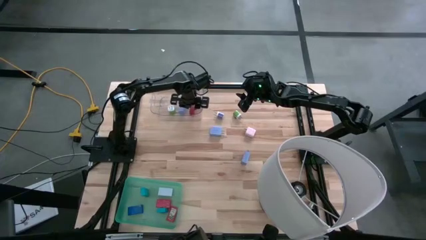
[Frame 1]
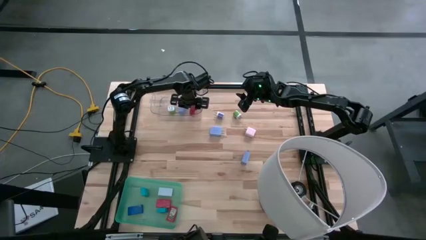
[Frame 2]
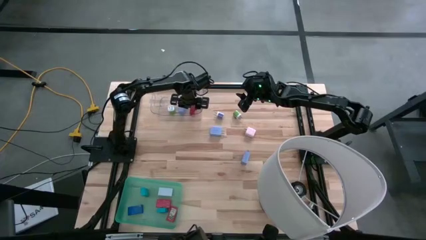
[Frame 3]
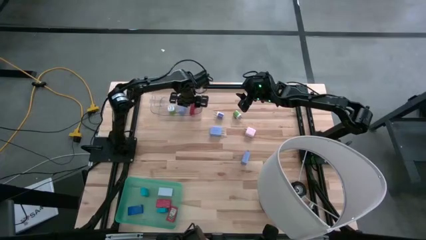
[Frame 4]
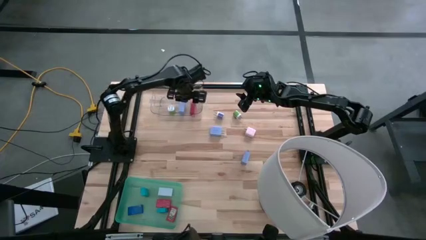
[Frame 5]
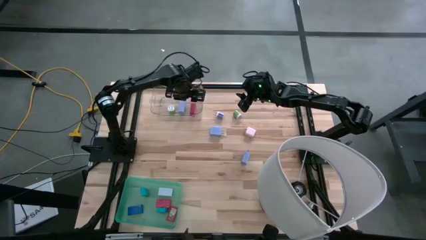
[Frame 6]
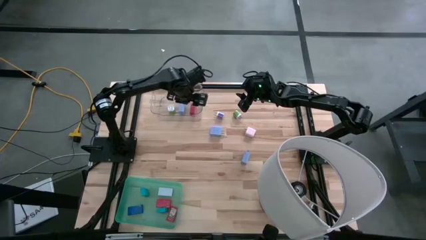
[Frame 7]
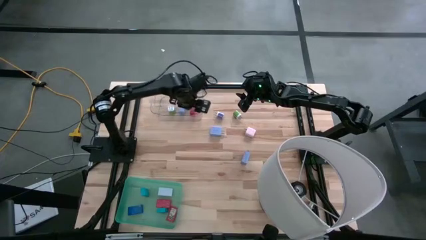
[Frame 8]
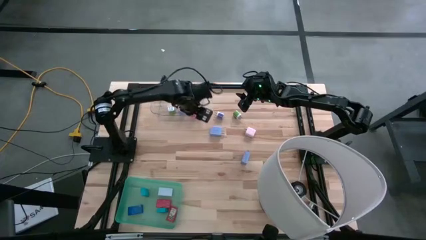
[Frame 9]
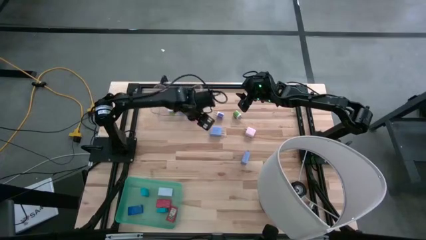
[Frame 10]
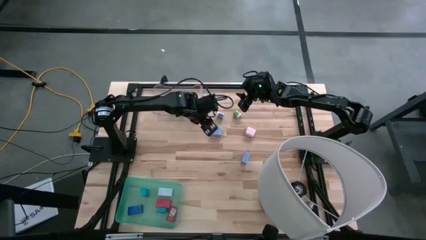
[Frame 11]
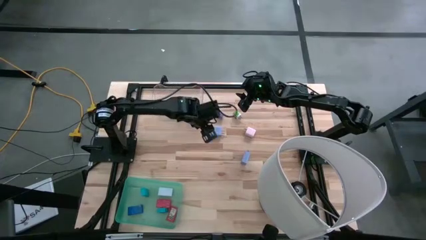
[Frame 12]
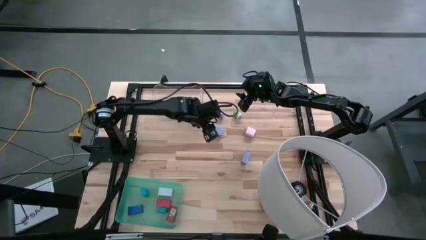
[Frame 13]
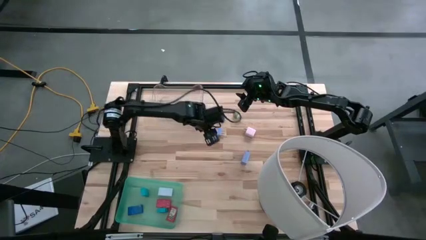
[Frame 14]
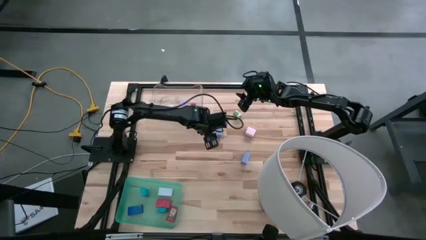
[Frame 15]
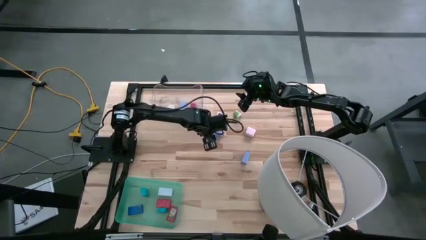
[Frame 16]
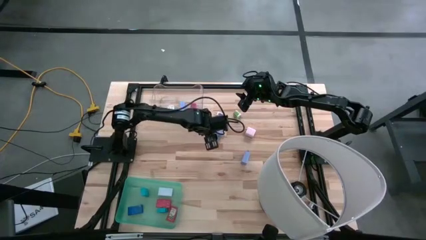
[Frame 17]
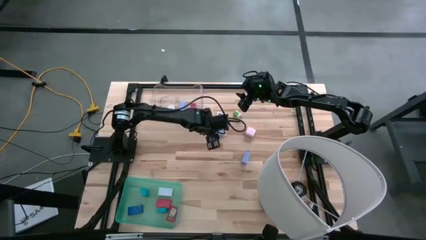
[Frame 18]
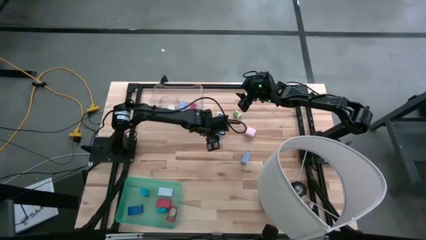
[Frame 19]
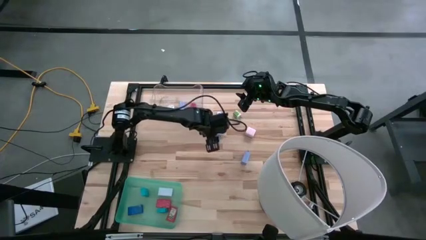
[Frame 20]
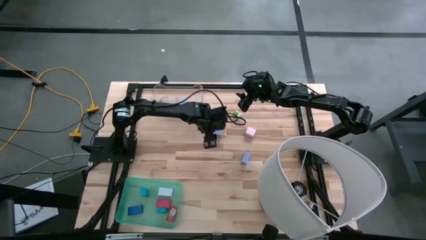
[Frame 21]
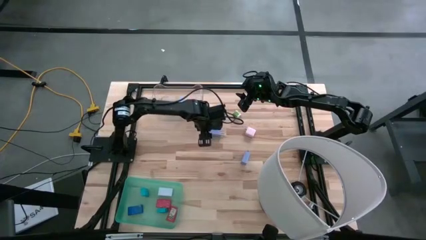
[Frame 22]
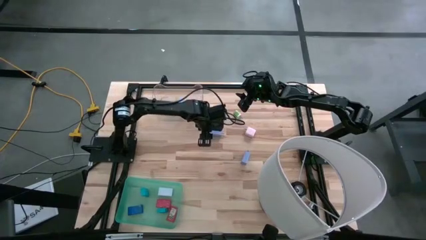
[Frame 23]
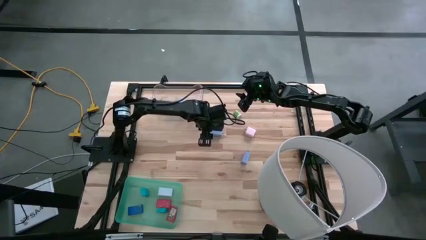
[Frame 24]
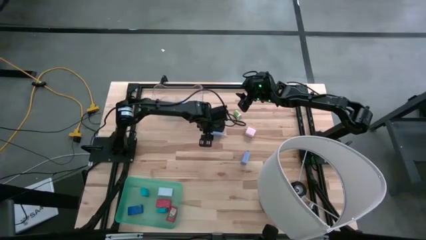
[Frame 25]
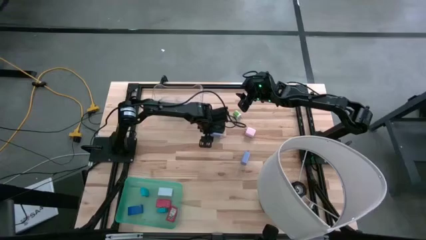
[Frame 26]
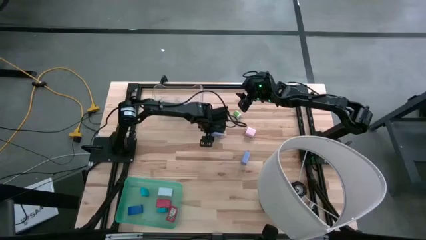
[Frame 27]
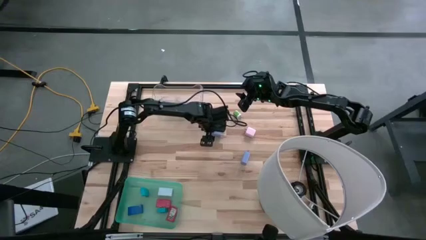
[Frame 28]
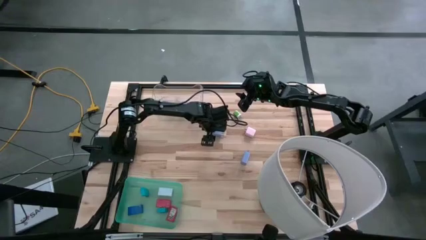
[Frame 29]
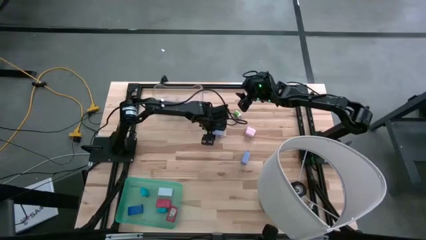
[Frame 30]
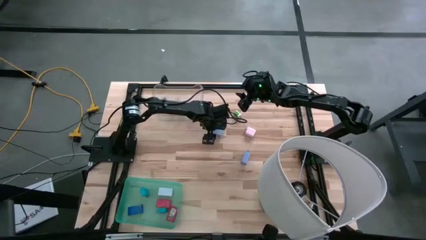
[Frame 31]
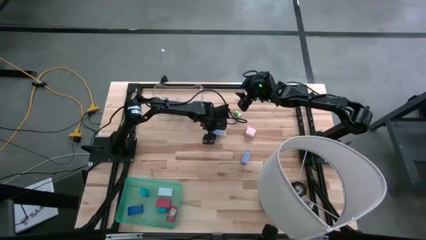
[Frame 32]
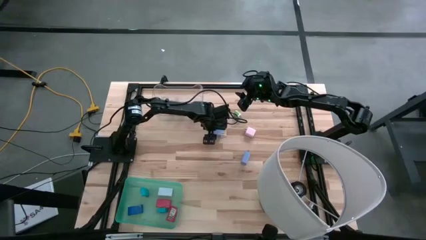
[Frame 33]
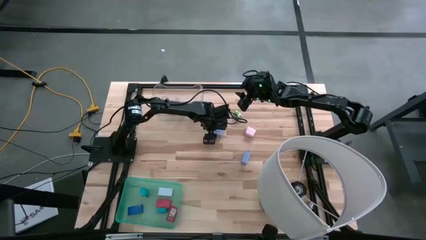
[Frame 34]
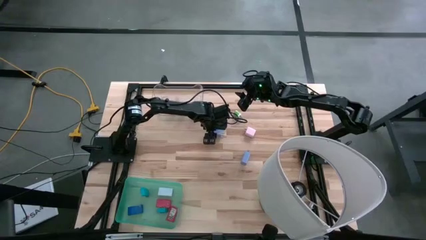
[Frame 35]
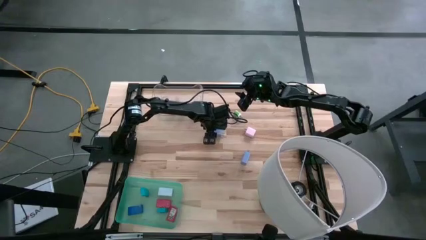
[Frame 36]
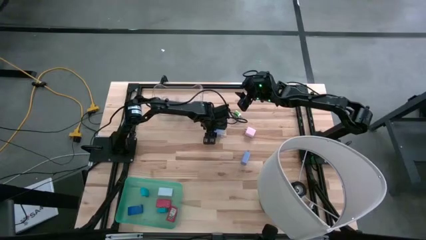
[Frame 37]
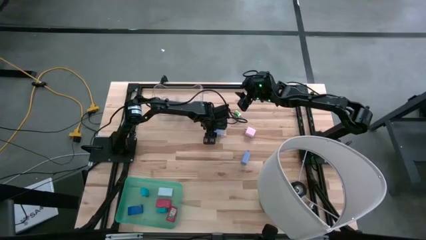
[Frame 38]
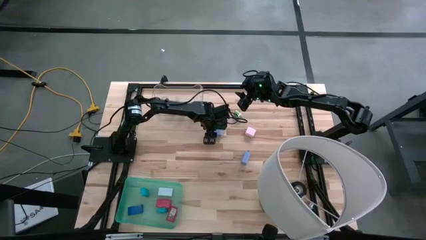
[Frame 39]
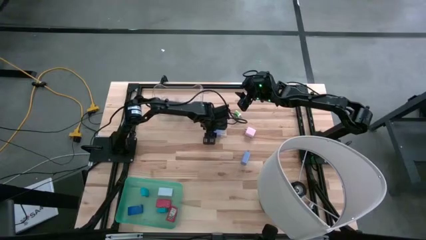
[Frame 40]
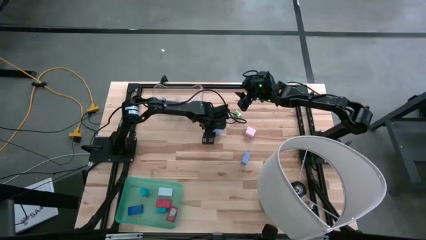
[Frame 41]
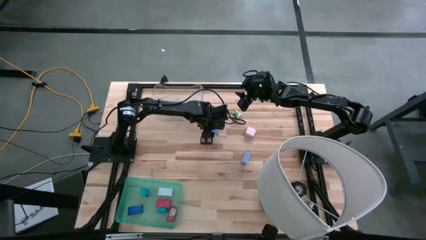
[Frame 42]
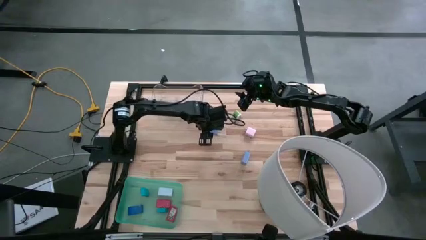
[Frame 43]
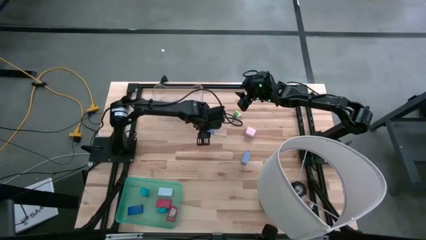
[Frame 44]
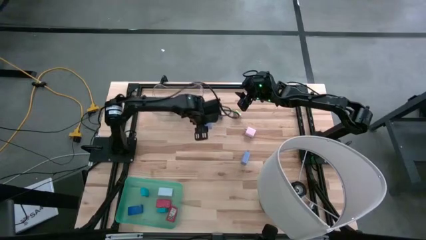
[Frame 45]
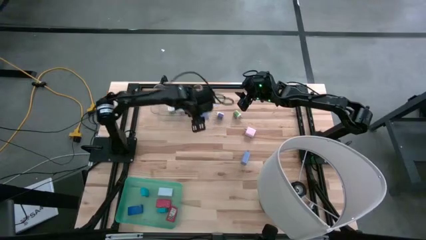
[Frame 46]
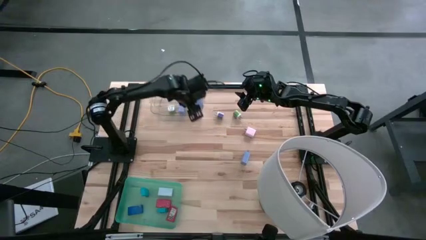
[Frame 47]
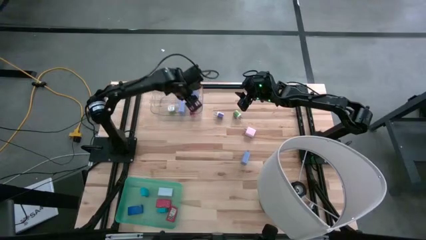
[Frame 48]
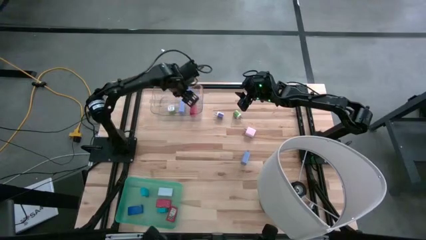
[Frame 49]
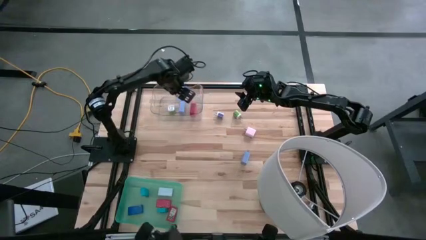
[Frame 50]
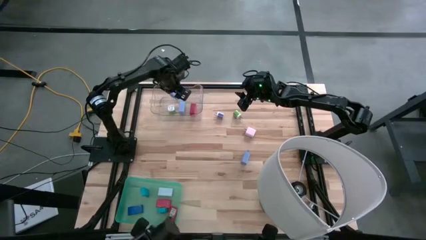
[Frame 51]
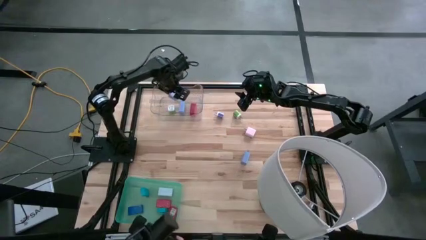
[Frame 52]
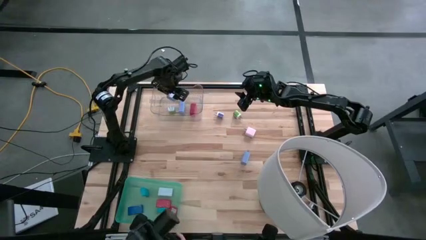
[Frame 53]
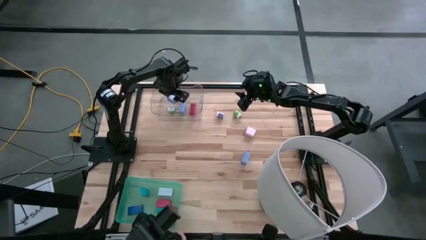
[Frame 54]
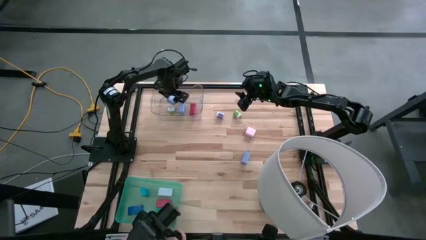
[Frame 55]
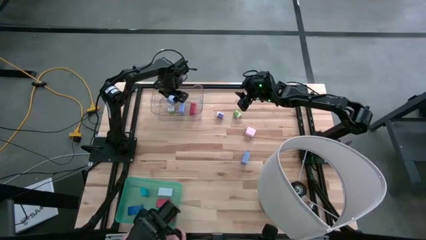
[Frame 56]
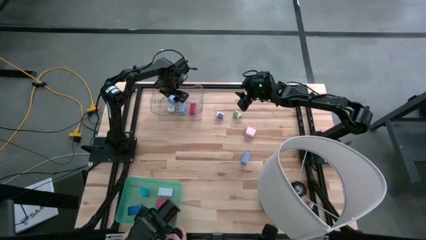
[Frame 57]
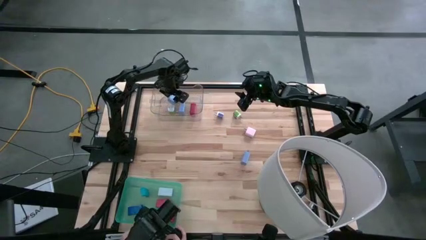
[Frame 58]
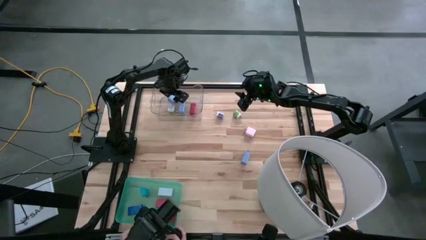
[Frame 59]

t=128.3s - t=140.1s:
Task: Pick & Place Office items
Put the top blue charger adapter into the transparent bin
